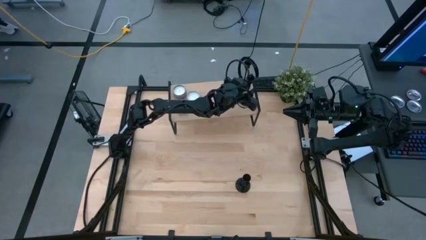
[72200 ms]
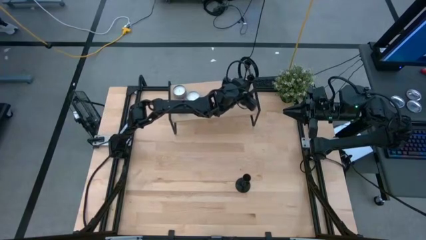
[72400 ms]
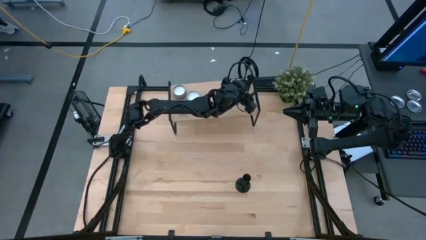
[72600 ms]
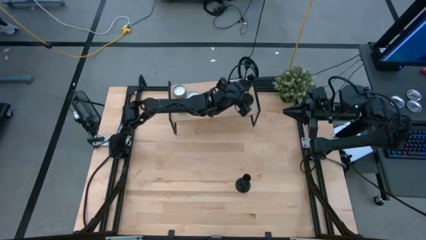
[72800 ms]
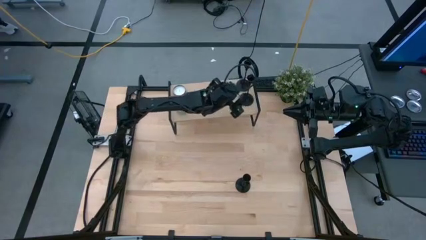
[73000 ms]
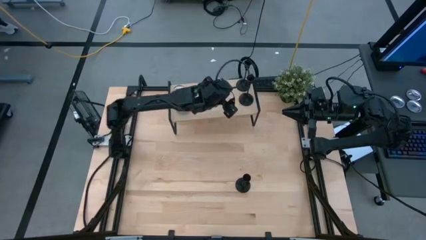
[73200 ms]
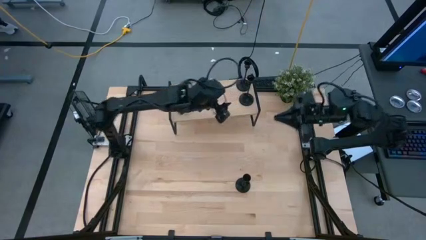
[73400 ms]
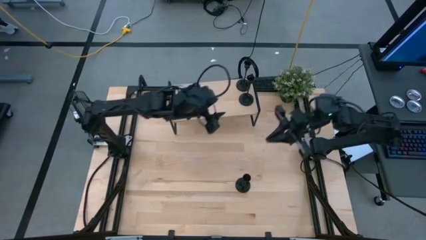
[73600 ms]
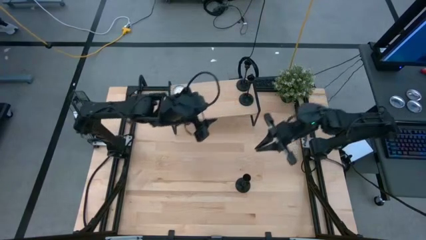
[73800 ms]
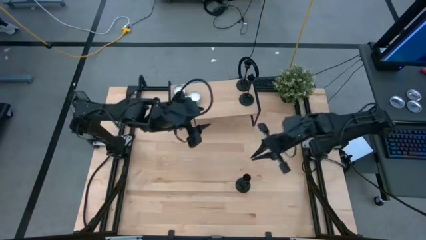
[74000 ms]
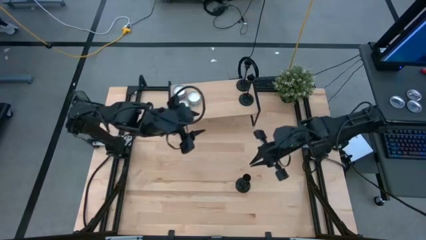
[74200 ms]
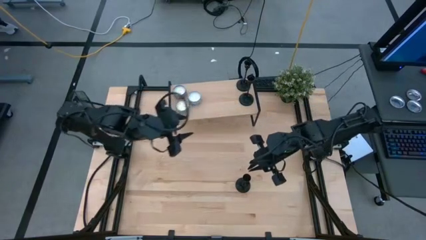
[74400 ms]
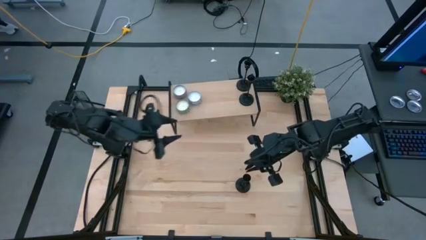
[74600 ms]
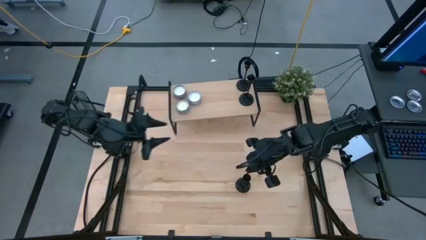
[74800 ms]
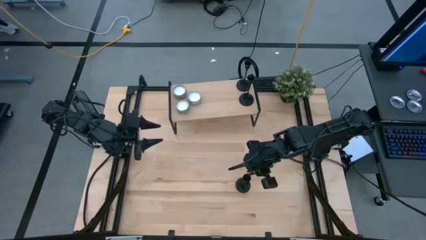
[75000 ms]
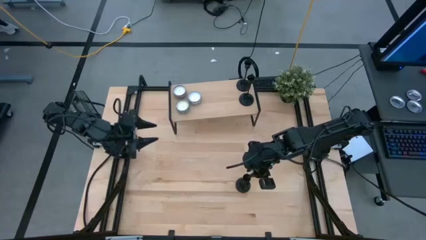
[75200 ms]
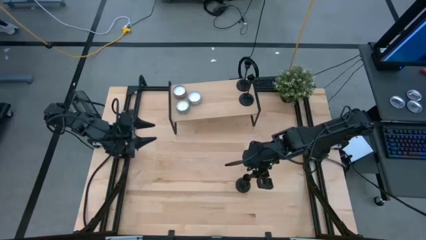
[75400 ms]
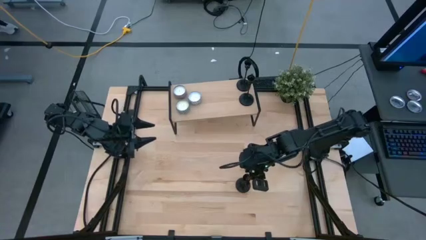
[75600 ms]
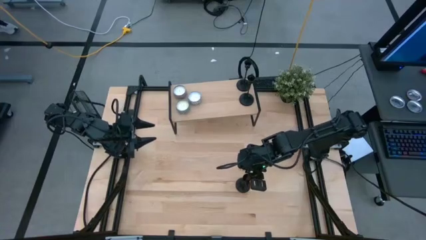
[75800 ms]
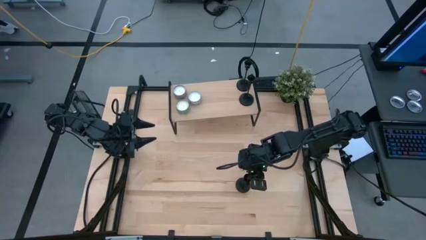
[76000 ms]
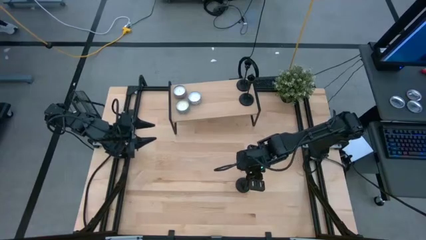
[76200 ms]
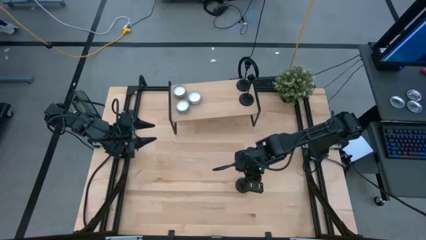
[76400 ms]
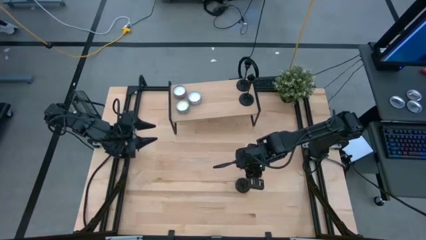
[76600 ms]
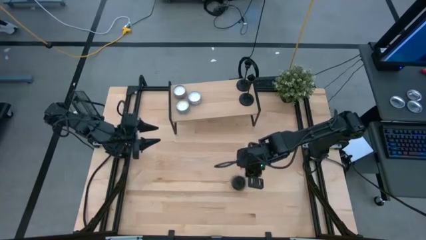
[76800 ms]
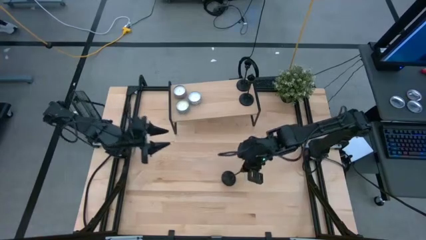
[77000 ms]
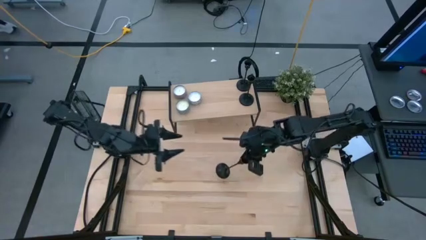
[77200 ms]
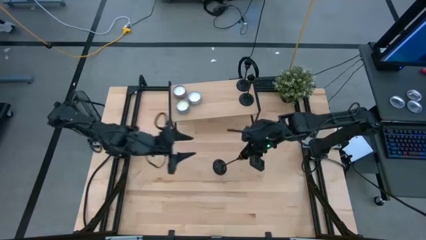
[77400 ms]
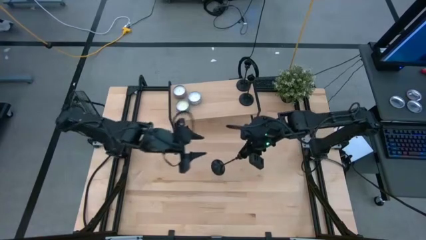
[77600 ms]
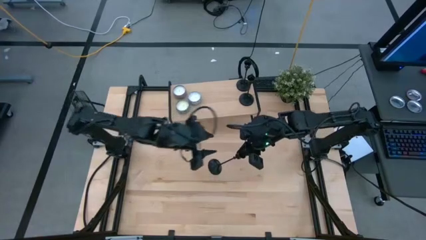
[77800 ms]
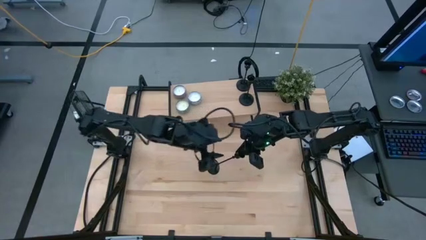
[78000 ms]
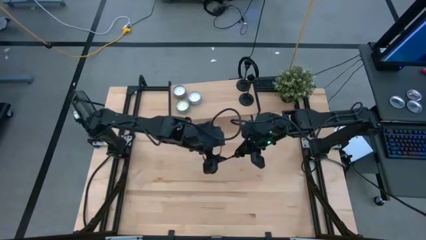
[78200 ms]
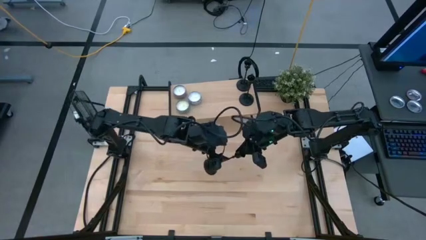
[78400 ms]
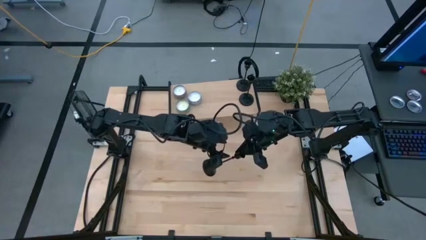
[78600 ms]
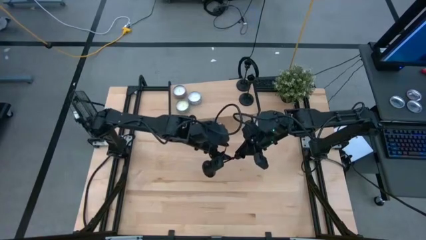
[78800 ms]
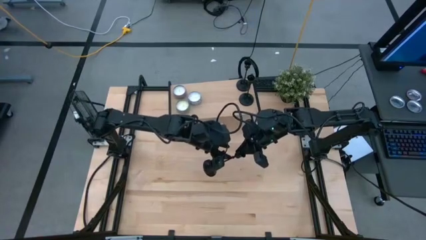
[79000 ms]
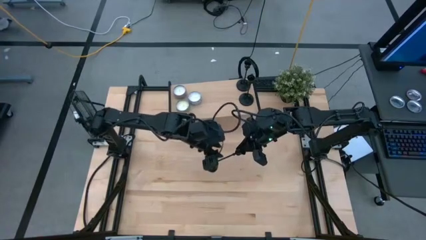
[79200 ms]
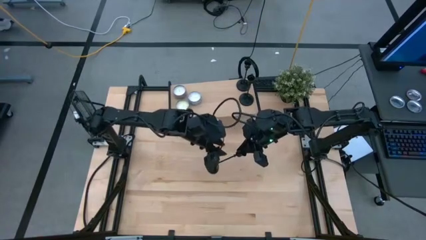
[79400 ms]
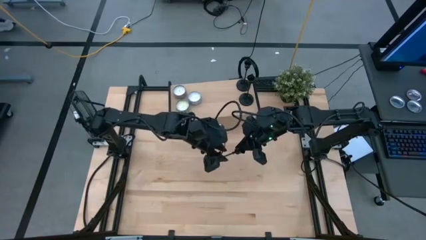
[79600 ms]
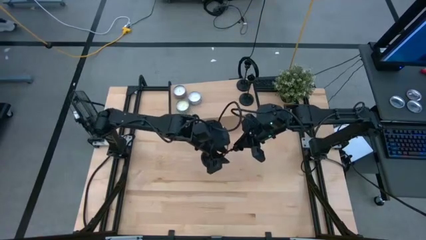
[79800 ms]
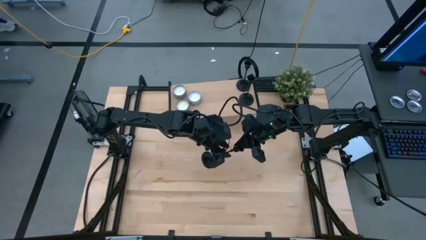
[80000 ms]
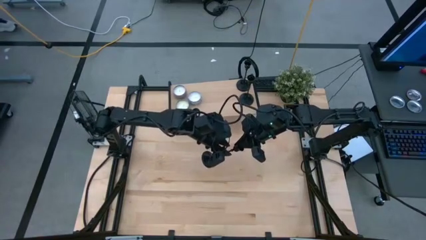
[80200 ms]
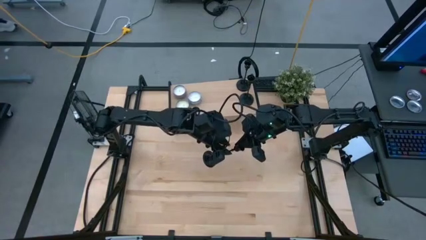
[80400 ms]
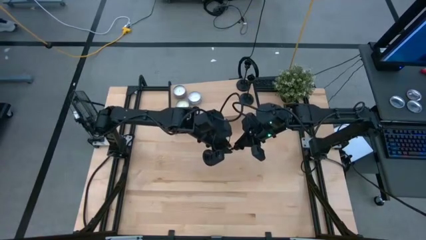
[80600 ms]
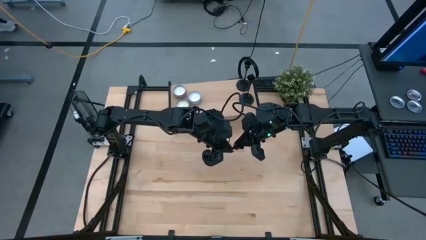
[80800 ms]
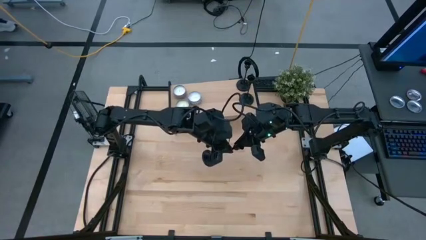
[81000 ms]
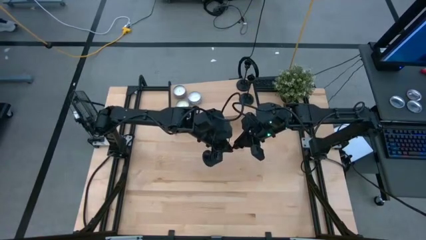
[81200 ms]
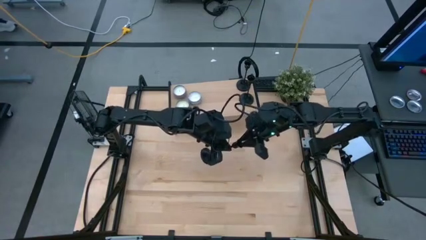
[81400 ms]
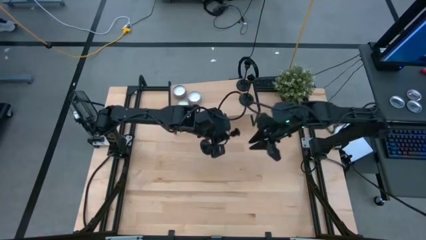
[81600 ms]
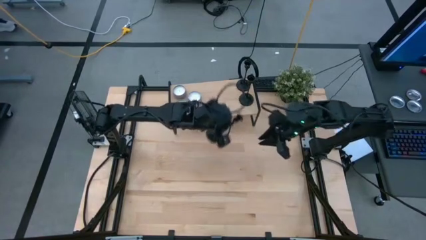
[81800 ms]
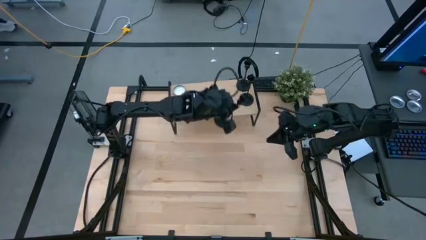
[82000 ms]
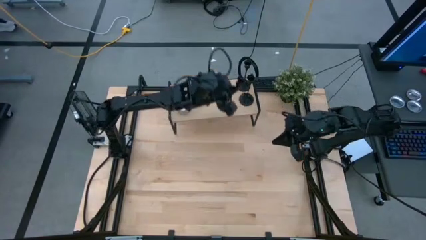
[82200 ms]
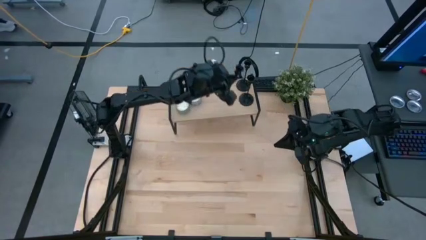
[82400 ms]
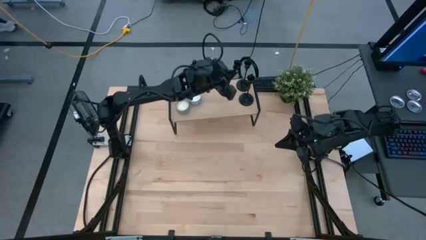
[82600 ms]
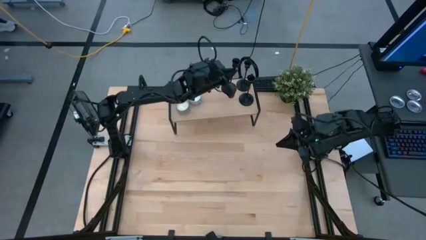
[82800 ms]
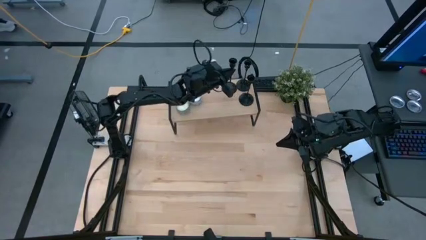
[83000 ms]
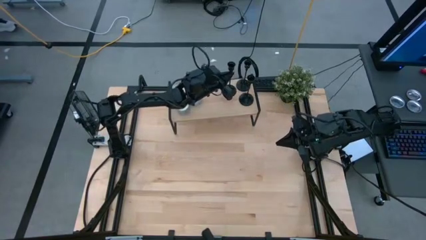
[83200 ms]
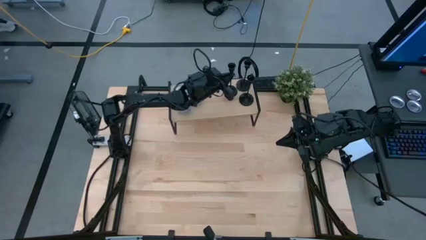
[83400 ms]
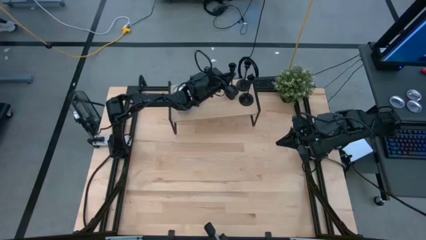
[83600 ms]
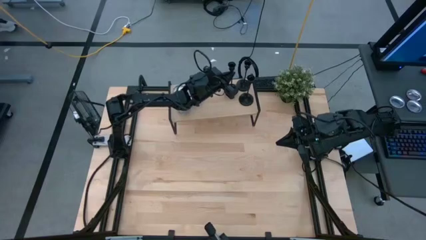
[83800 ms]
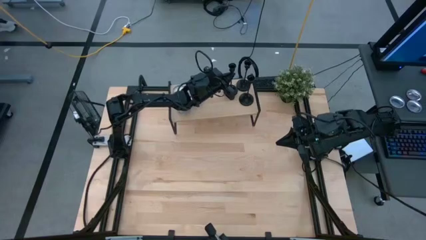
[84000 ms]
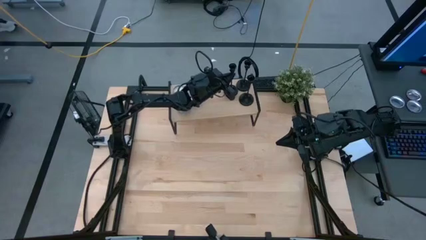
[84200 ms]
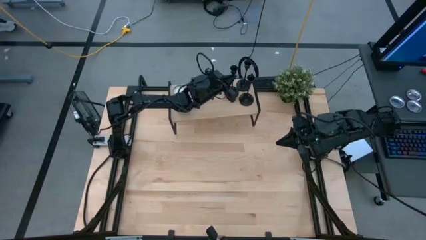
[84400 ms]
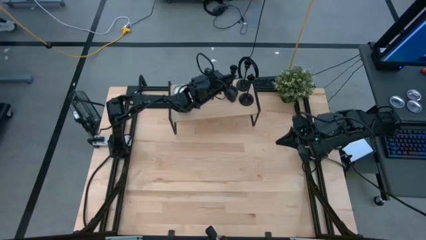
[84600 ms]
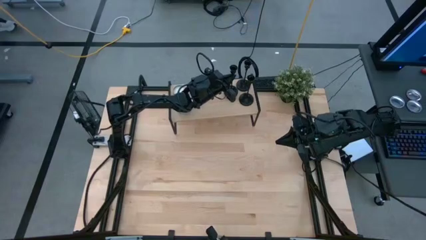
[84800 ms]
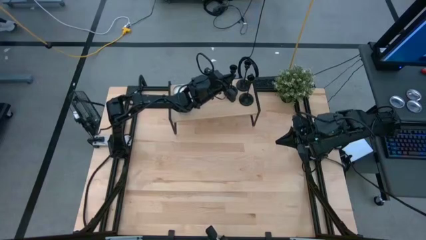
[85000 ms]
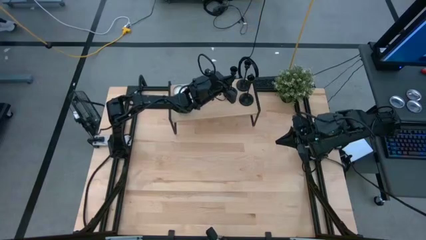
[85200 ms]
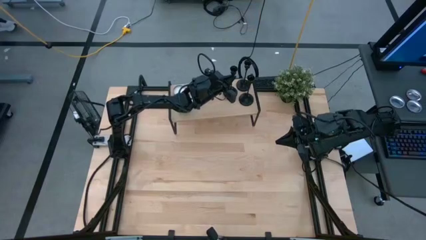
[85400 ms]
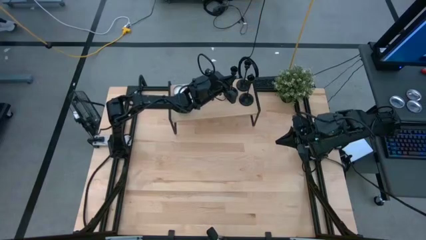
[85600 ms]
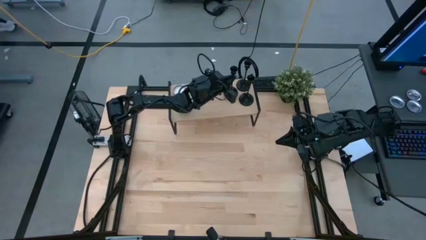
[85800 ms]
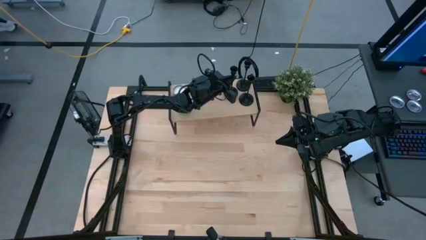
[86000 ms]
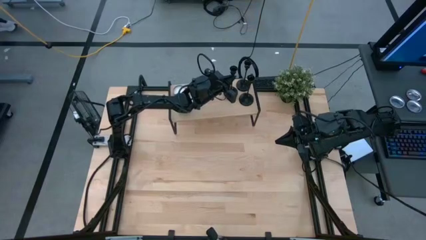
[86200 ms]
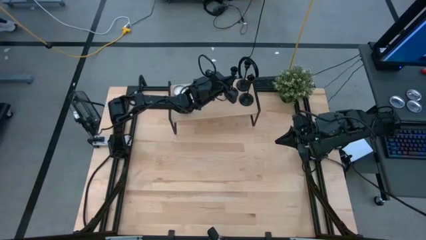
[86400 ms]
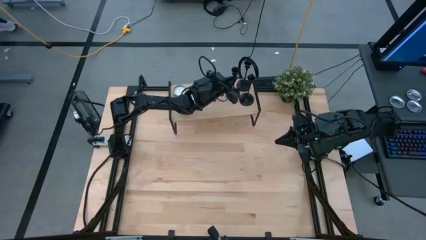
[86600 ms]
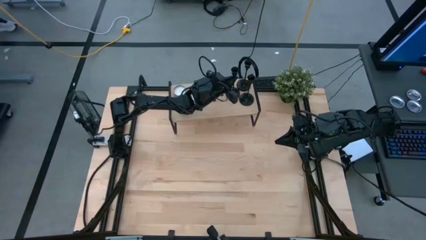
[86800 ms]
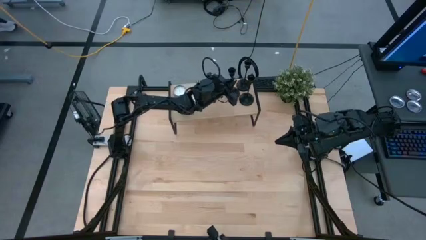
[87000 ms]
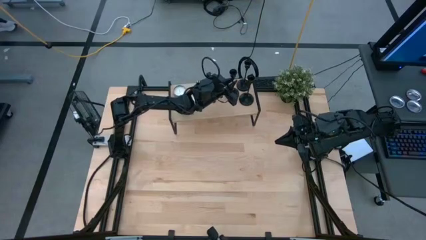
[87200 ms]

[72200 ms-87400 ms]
Task: Pick & Place candle stick holders
Put the black candle holder on the shelf
